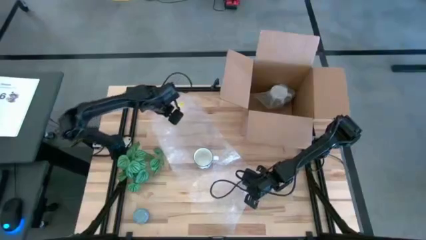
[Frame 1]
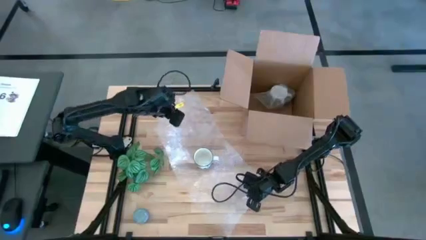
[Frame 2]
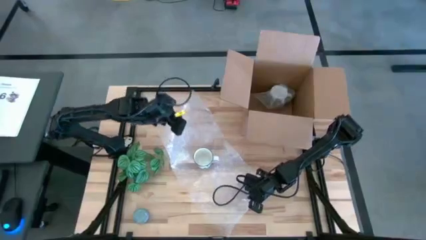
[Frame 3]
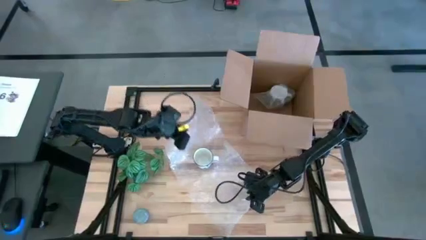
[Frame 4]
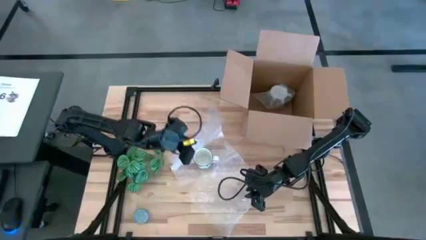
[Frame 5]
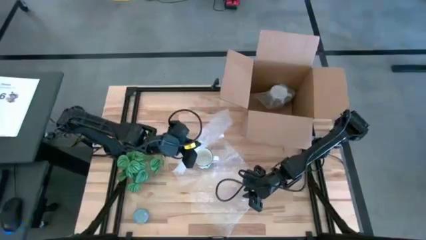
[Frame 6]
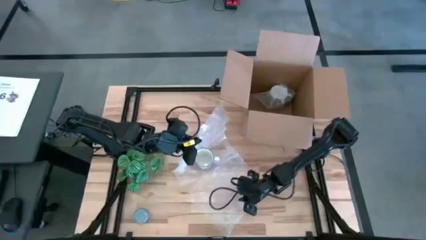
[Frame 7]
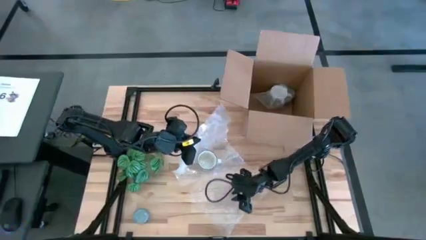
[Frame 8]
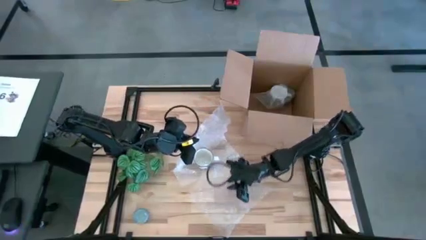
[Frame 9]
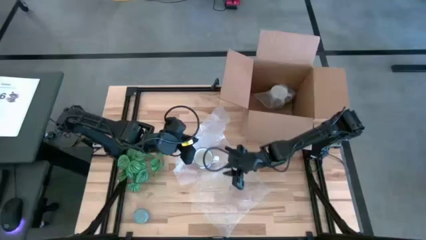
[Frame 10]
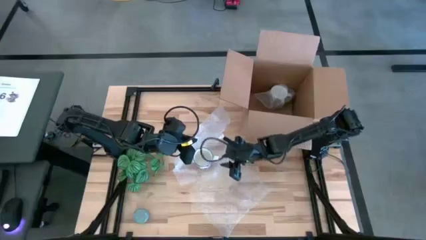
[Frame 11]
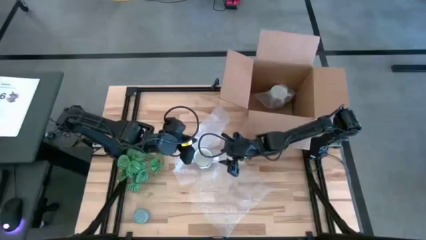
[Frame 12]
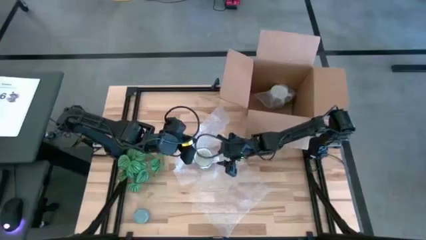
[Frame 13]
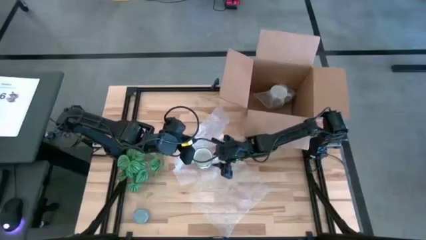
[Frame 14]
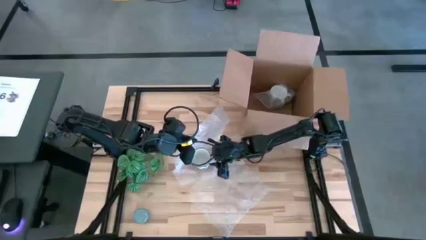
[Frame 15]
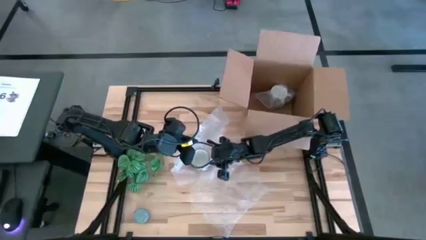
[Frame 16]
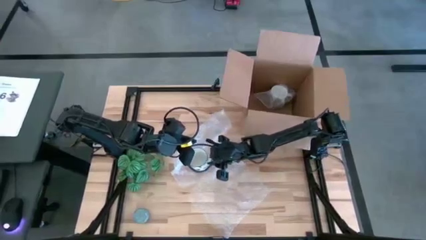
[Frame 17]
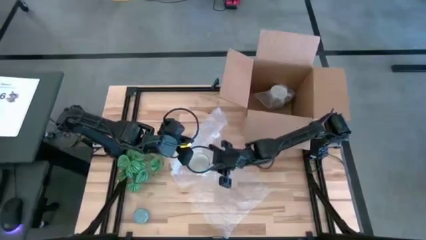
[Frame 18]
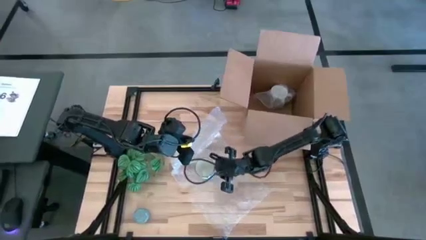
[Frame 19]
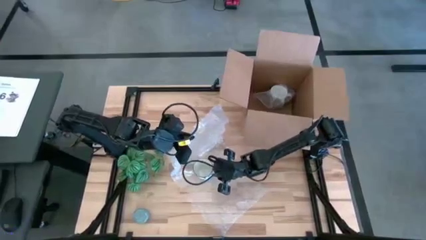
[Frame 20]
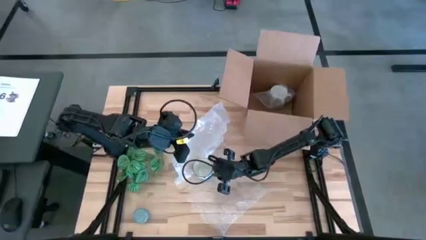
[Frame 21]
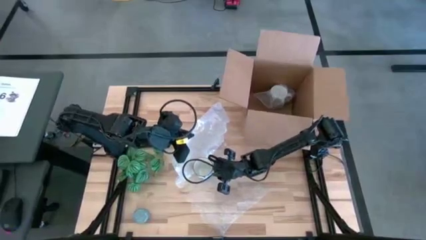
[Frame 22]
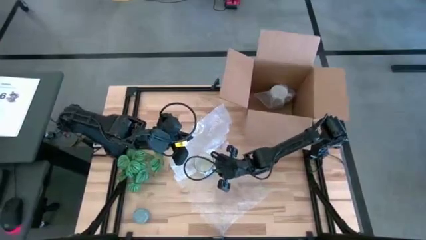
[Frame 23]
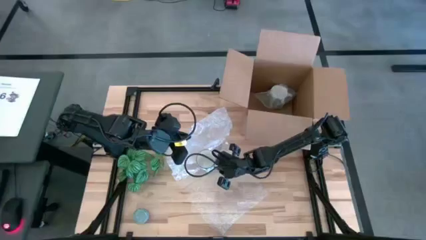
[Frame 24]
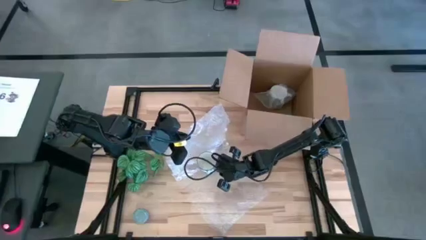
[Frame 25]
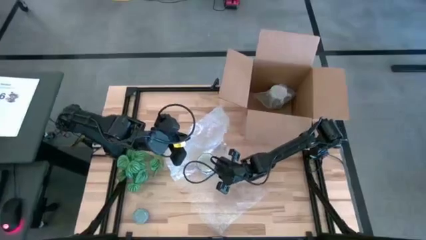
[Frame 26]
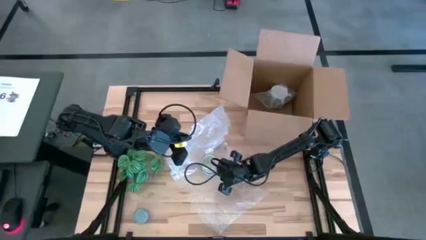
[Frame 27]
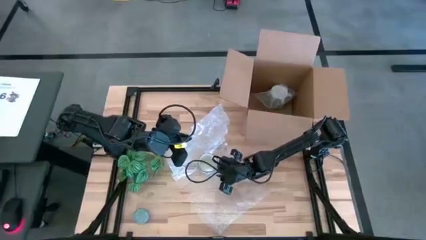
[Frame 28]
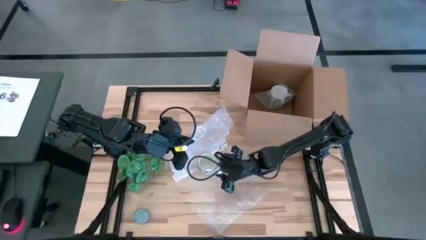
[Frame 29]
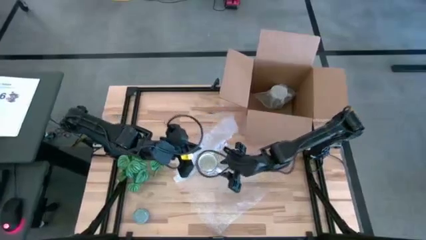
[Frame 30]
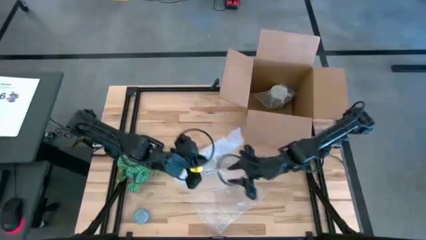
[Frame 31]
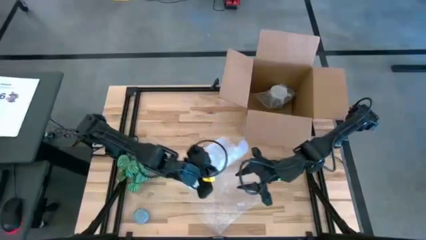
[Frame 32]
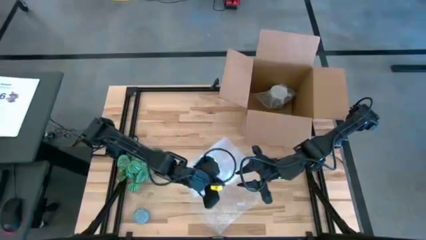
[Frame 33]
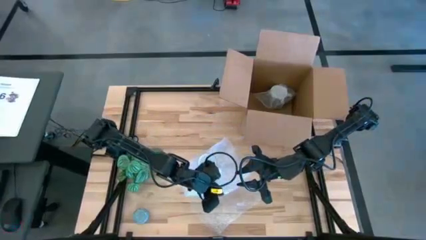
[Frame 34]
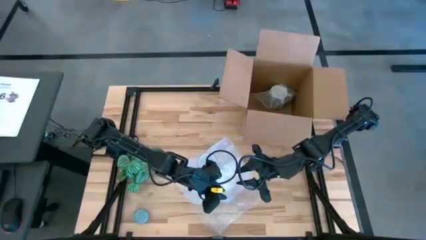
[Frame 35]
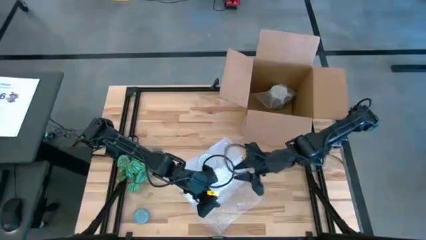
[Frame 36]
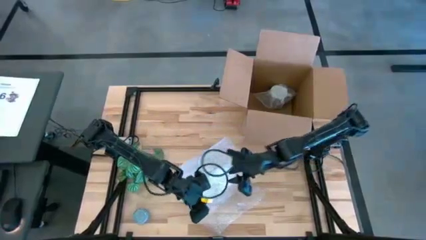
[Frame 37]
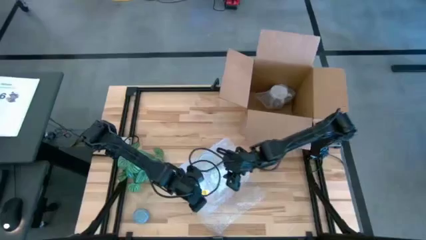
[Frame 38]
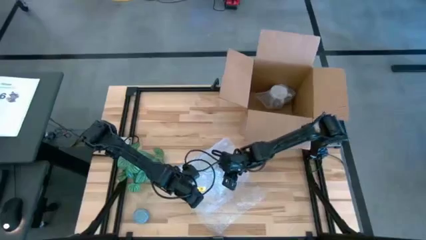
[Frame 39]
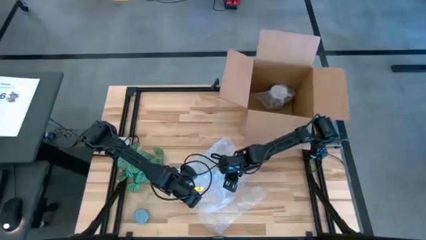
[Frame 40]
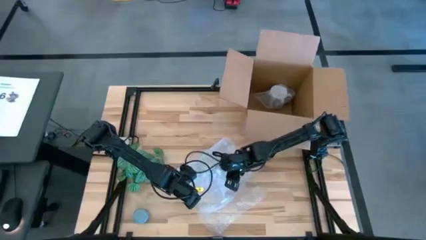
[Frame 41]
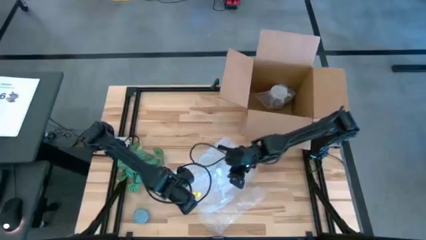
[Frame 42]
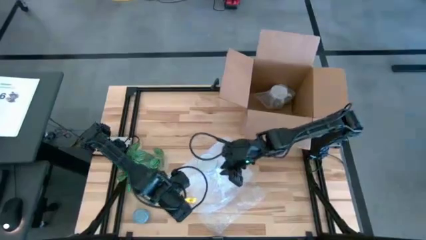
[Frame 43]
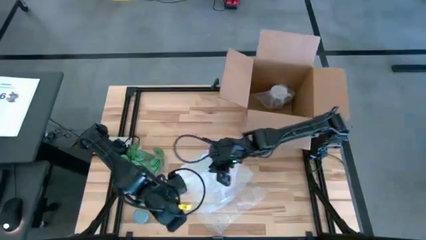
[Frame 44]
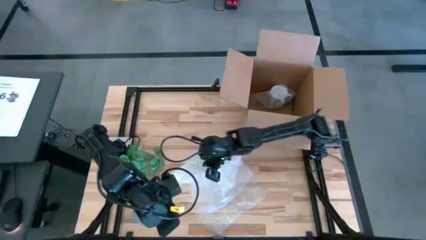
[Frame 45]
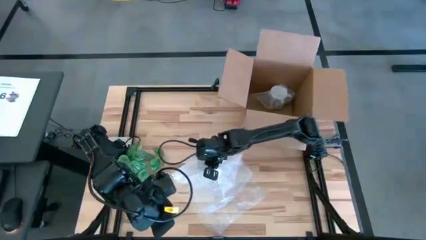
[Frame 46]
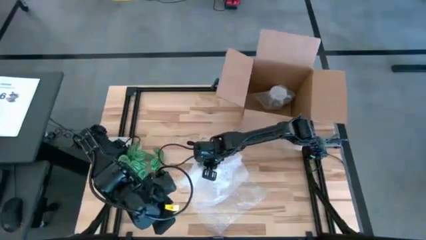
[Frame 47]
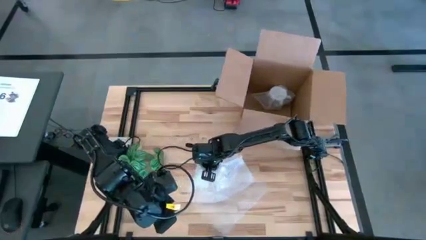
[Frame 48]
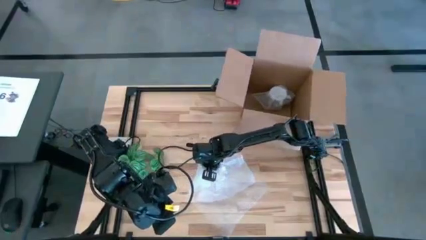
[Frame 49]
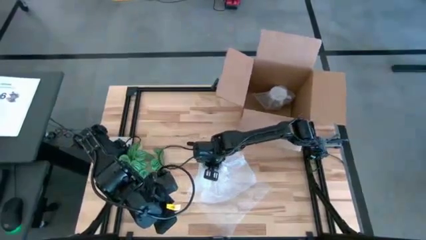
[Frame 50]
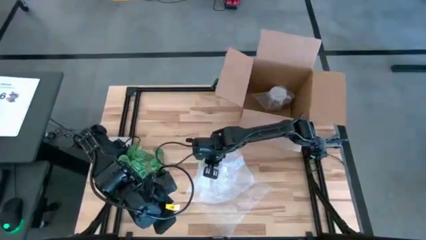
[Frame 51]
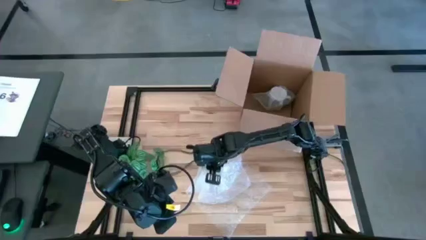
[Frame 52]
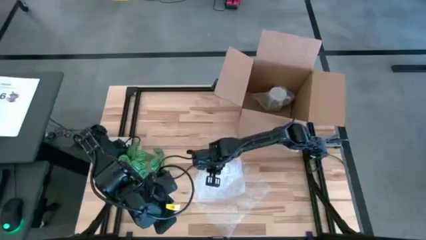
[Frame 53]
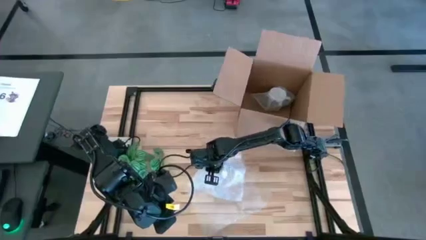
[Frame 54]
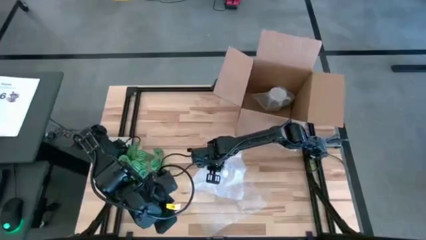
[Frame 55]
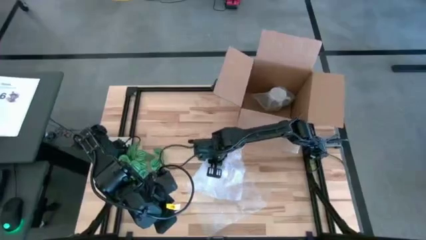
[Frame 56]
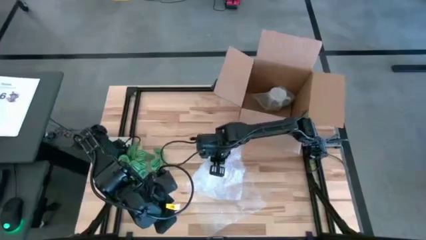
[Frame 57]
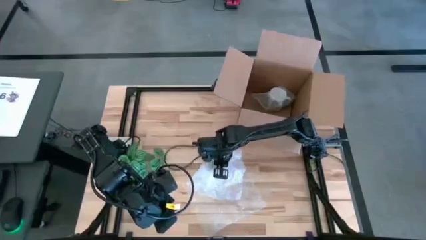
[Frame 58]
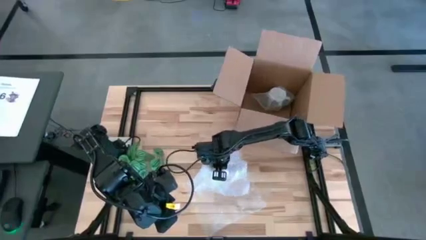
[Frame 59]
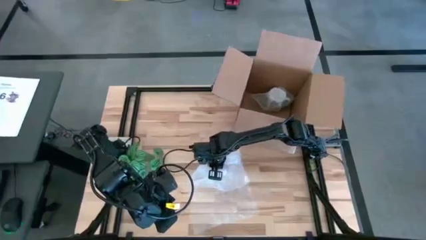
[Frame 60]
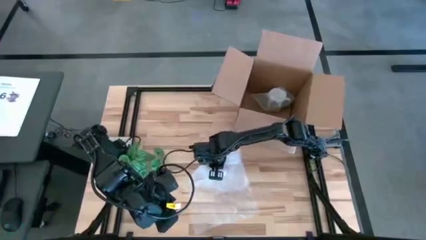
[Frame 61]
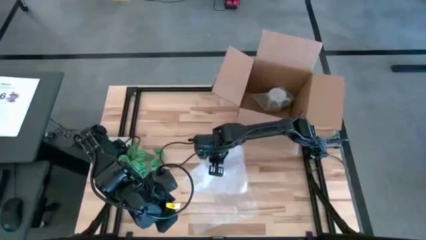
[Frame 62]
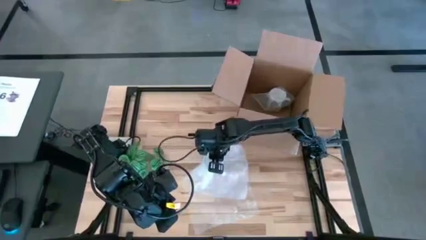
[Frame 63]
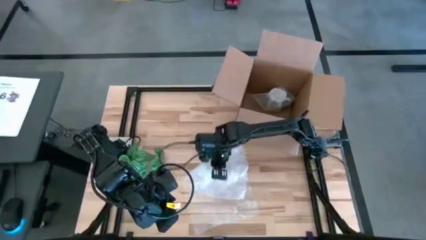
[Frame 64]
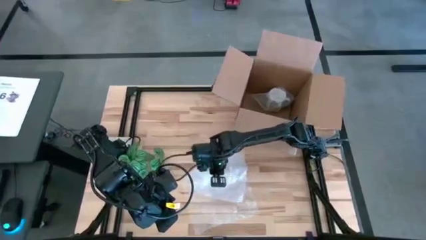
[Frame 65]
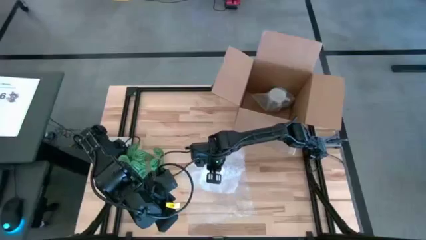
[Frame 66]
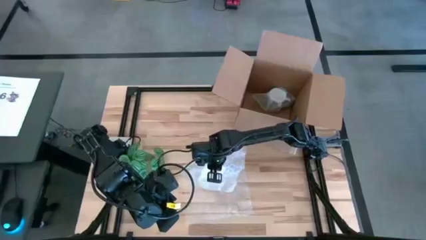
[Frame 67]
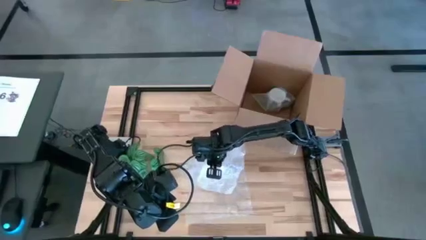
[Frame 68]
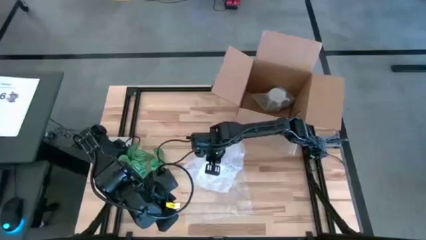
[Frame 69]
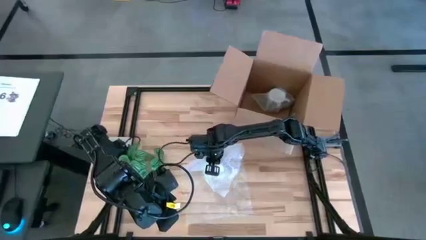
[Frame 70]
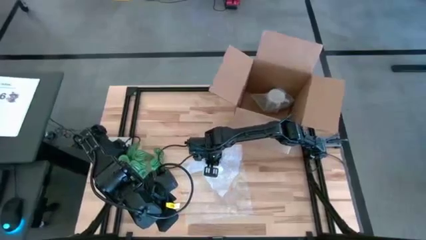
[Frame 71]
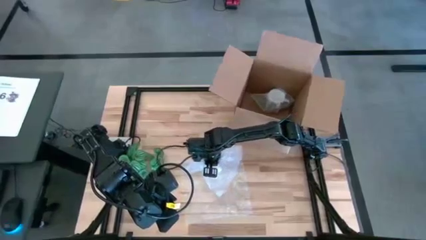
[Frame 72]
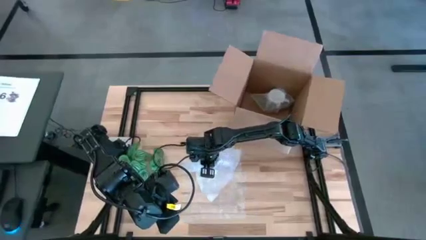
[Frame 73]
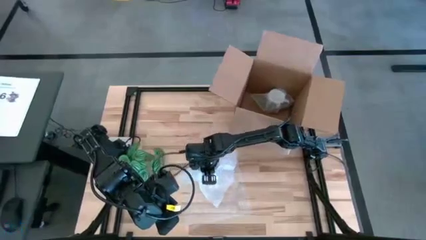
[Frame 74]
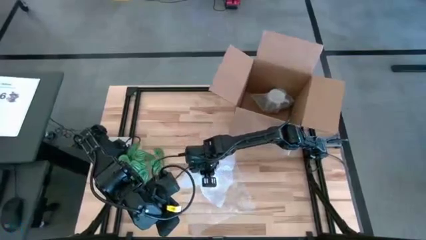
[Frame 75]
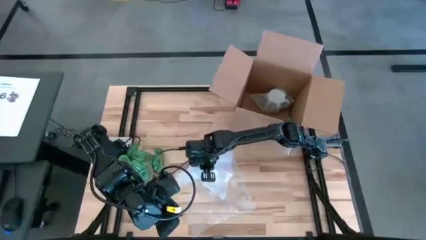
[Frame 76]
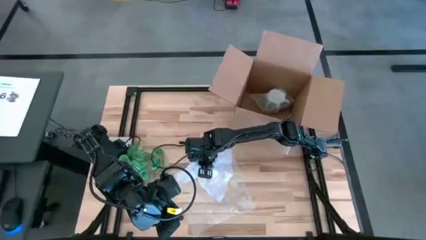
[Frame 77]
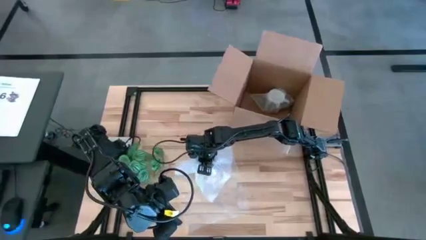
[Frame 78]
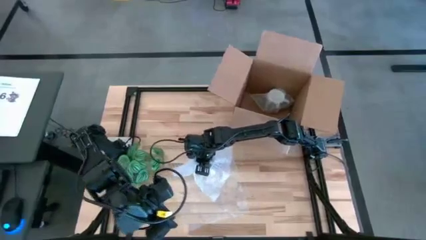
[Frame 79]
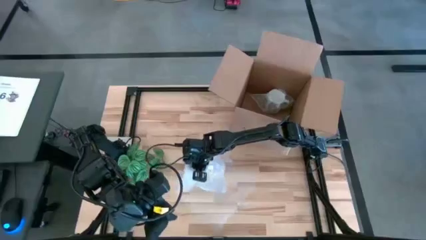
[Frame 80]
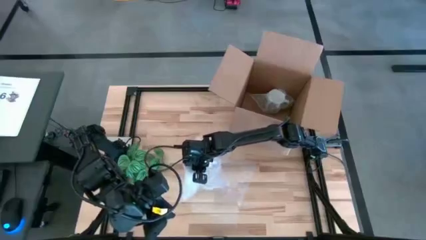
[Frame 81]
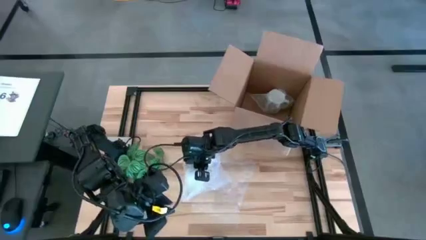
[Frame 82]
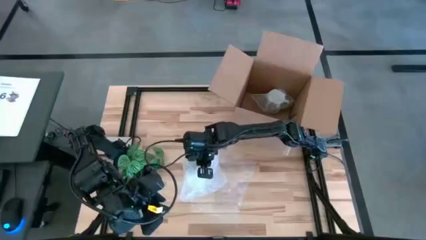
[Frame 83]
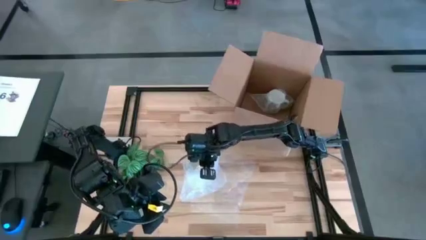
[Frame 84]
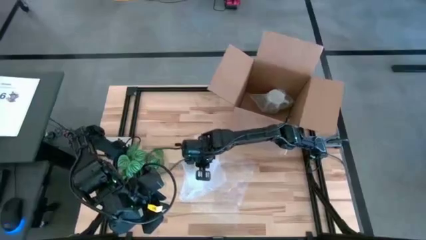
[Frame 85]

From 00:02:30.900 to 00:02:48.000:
Task: wrap mug
Wrap the blue mug with bubble wrap
